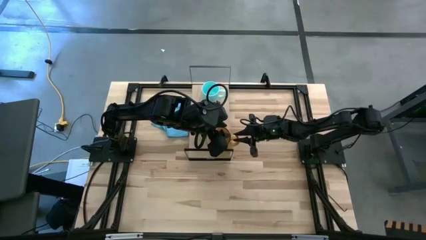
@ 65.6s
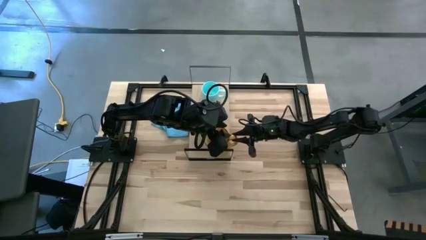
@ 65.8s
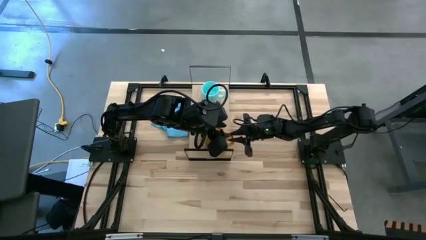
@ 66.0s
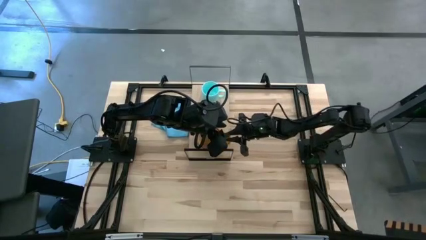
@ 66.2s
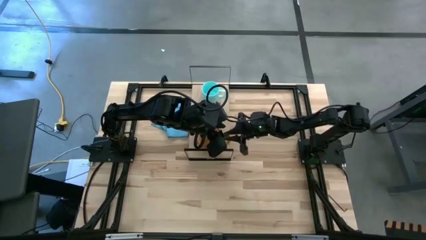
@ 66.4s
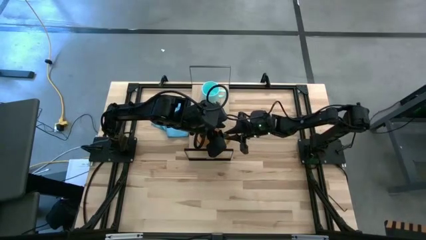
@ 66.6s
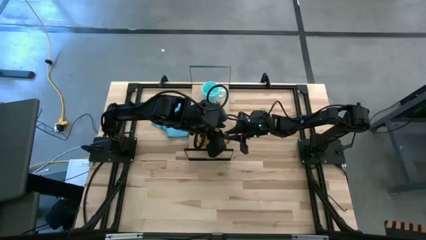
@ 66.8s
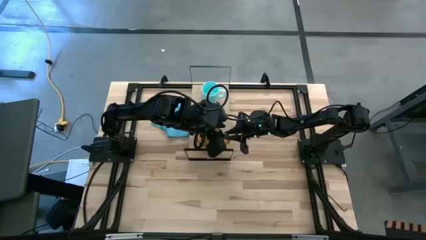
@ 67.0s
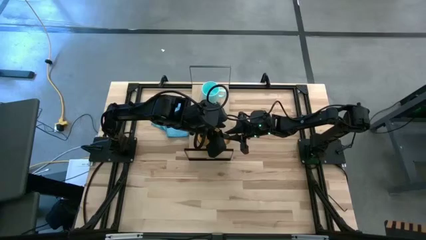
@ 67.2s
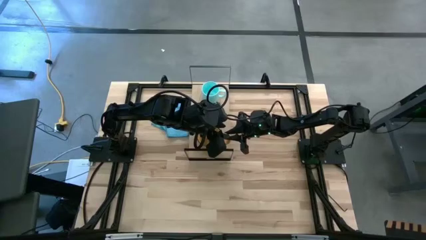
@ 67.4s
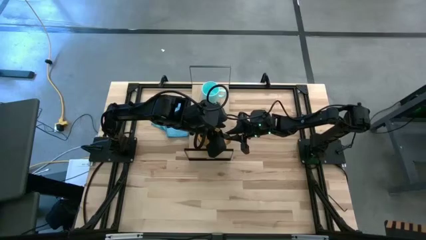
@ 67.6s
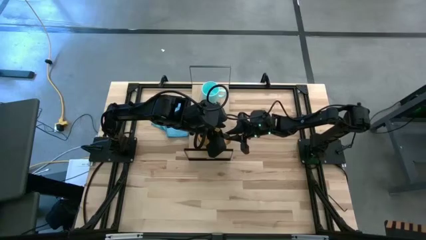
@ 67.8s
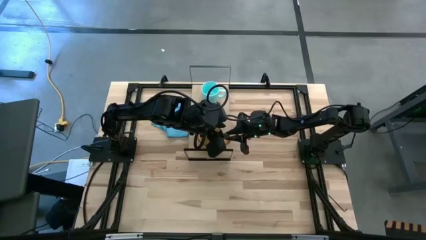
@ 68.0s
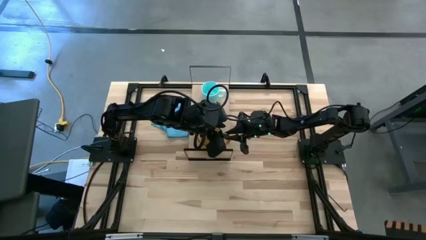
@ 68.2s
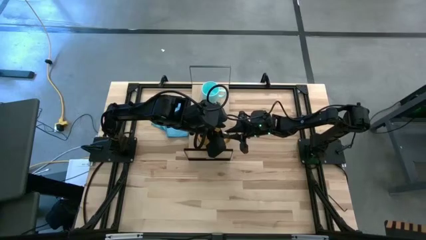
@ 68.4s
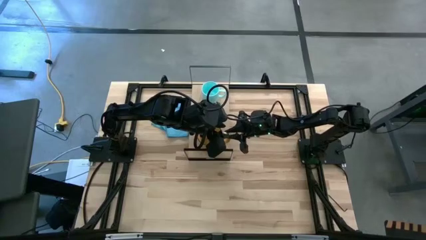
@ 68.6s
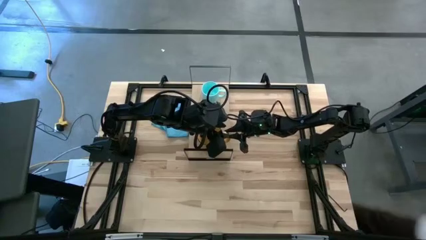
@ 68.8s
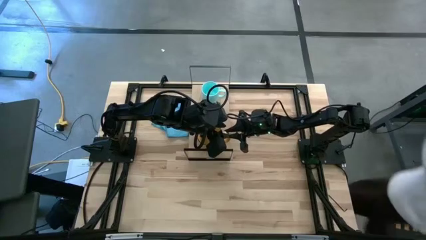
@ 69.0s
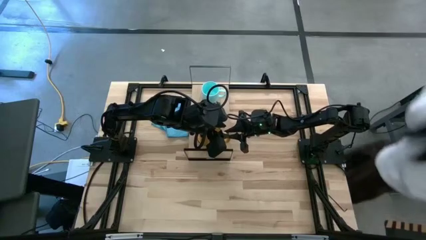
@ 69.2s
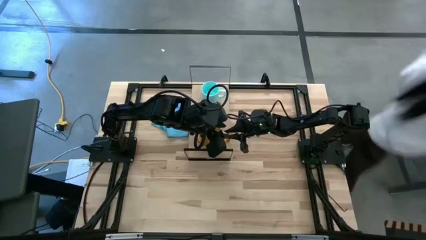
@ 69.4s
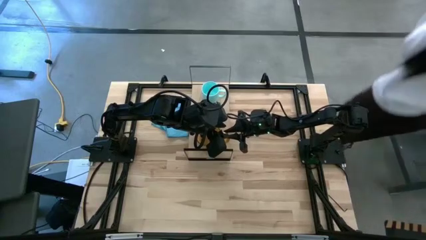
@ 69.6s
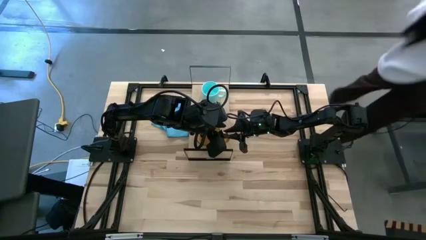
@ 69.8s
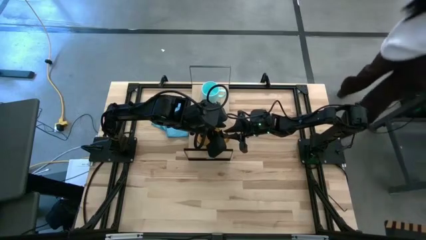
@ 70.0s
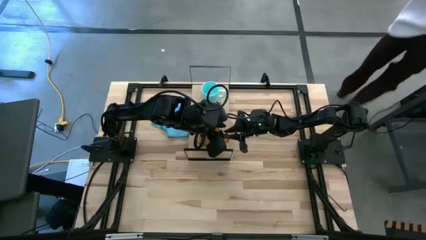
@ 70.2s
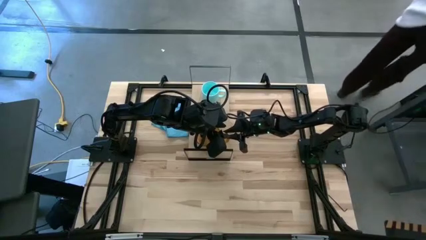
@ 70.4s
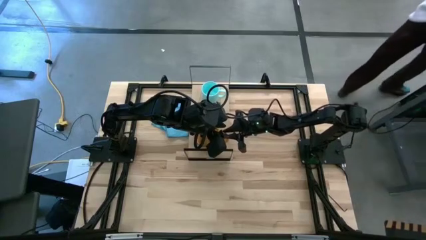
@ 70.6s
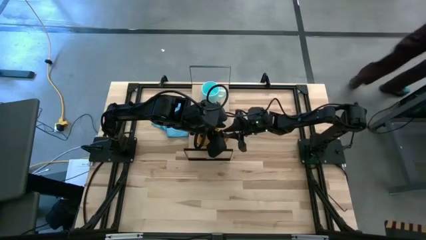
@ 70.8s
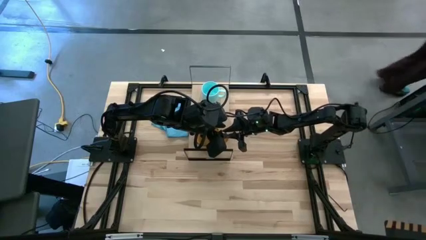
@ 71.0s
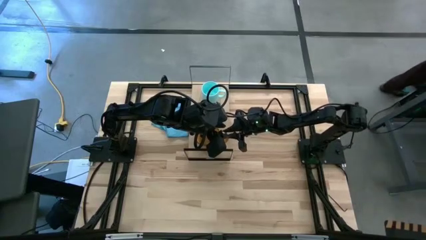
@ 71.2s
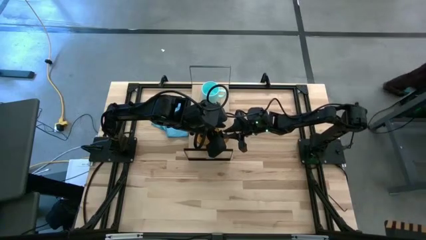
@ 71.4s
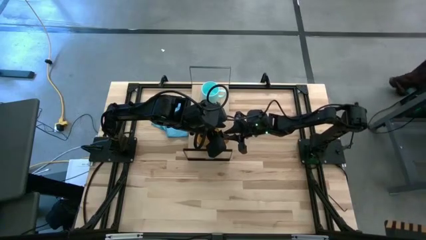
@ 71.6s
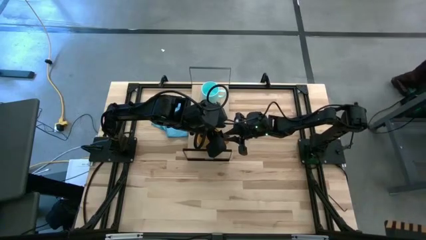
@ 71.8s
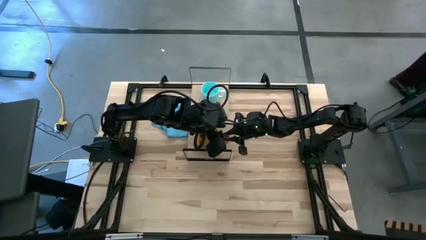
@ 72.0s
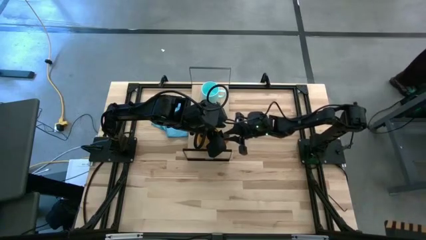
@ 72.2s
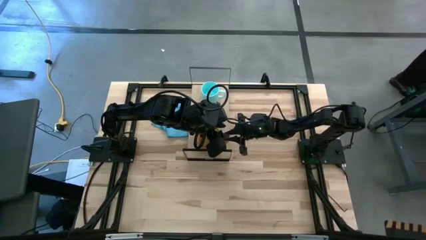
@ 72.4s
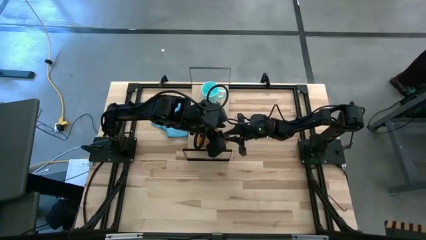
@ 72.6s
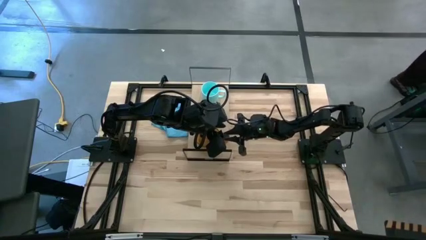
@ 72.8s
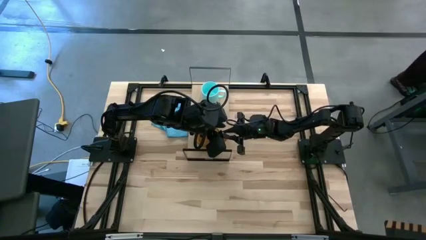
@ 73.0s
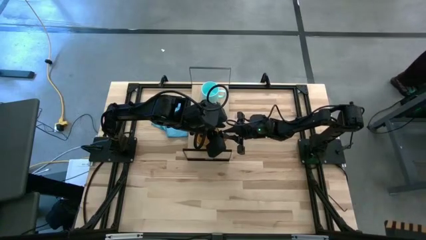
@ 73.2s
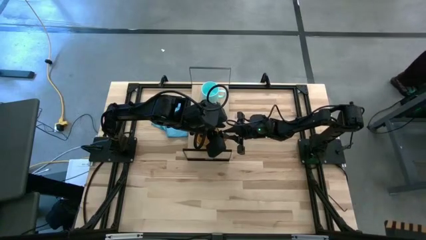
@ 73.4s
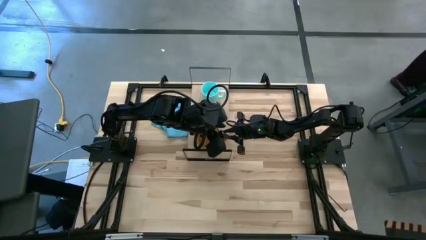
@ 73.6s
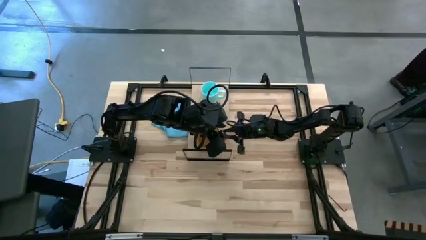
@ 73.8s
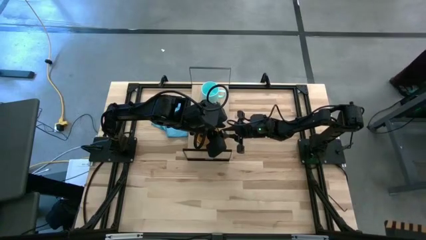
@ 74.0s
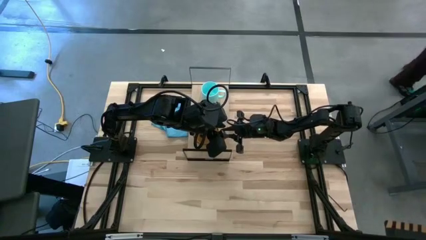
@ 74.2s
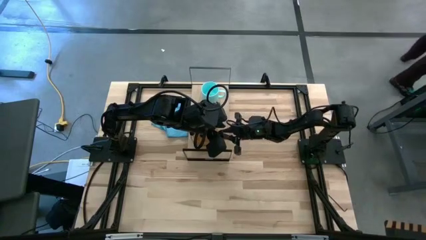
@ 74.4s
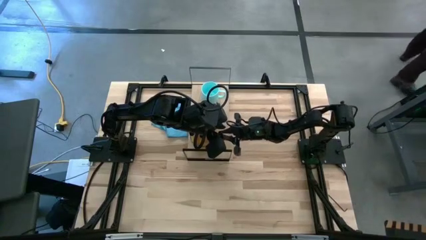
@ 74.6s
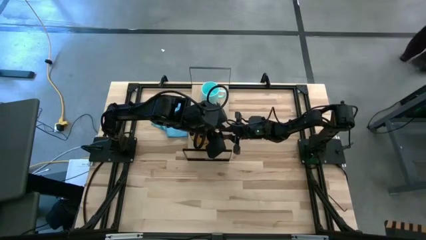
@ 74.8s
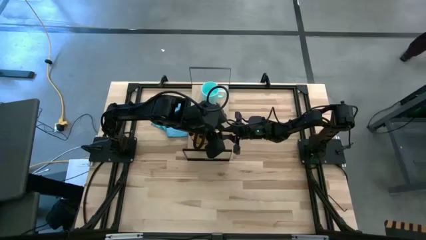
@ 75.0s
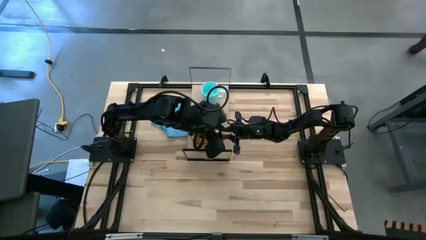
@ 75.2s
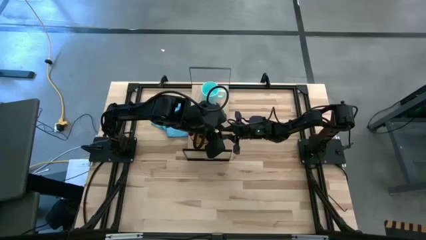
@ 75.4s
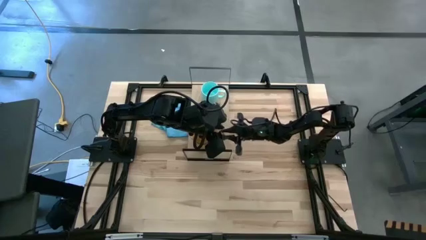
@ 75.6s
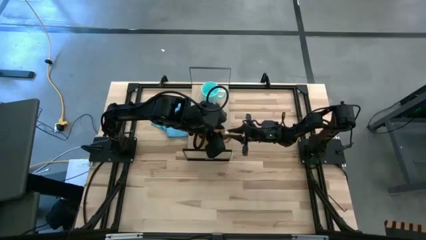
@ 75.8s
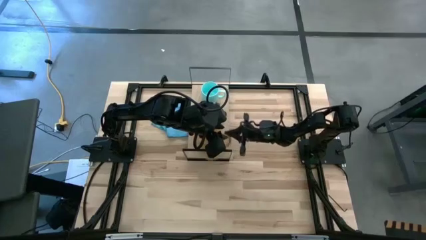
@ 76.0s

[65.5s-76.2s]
Task: Stack small to large cups/mugs on shelf
Put the yellow mug on the shelf

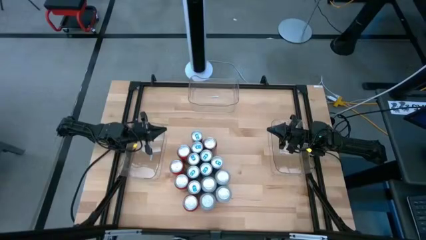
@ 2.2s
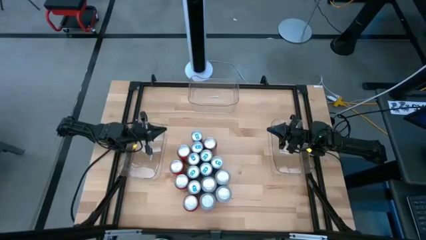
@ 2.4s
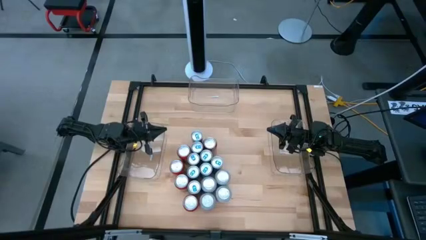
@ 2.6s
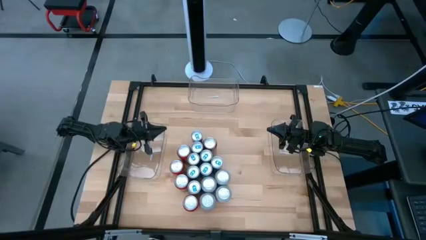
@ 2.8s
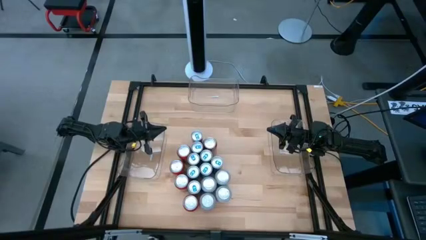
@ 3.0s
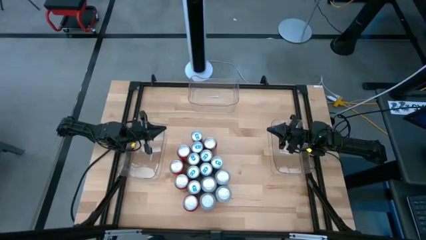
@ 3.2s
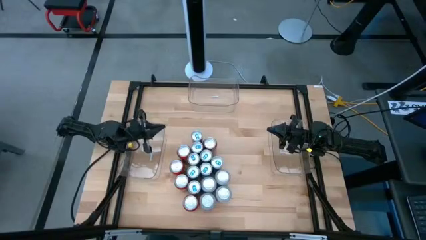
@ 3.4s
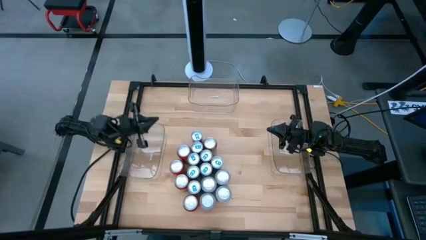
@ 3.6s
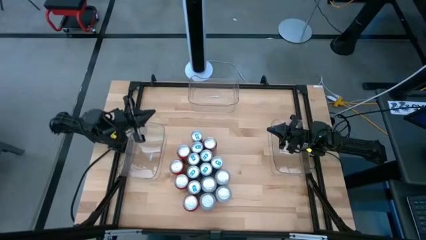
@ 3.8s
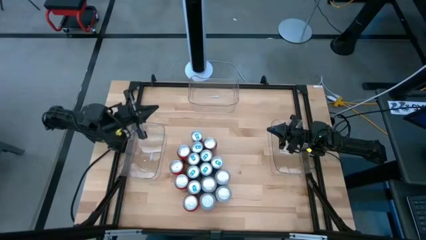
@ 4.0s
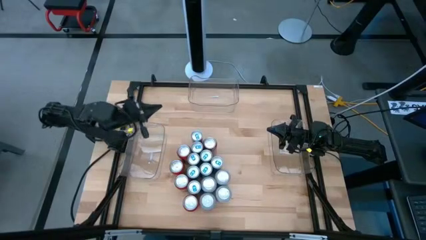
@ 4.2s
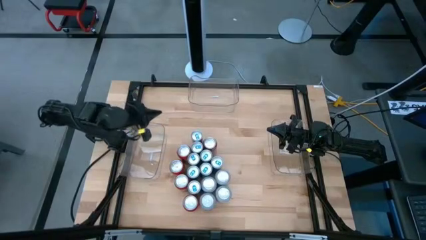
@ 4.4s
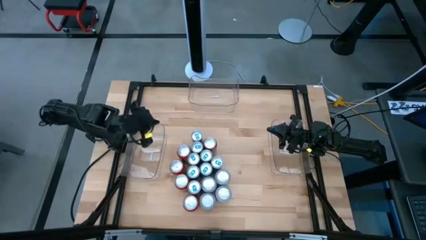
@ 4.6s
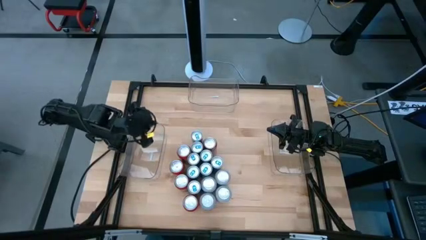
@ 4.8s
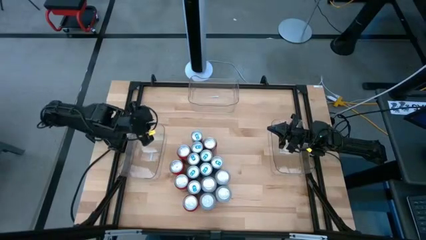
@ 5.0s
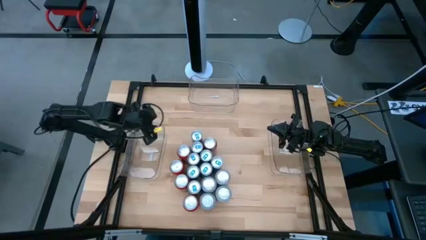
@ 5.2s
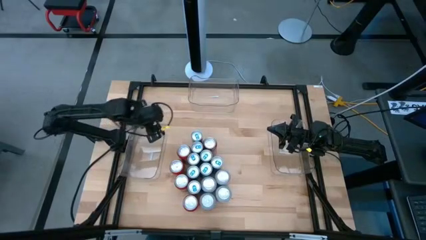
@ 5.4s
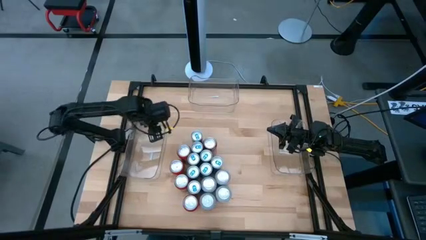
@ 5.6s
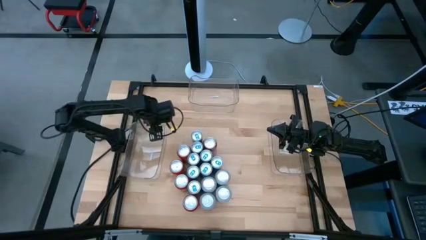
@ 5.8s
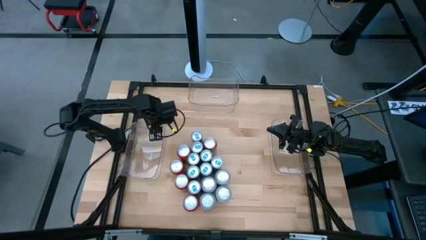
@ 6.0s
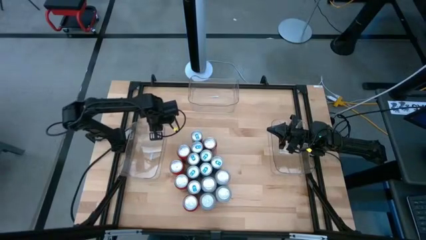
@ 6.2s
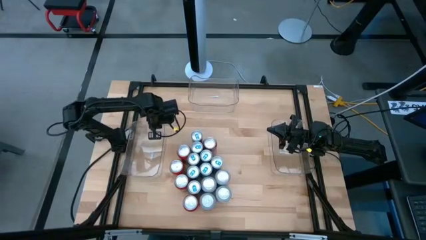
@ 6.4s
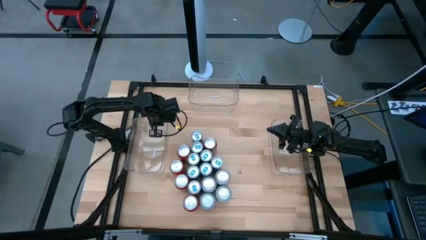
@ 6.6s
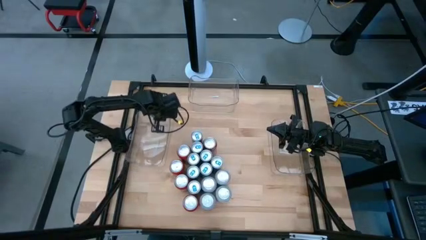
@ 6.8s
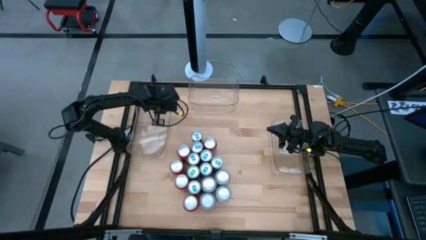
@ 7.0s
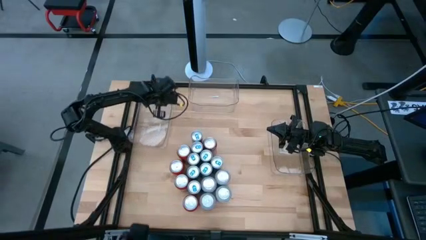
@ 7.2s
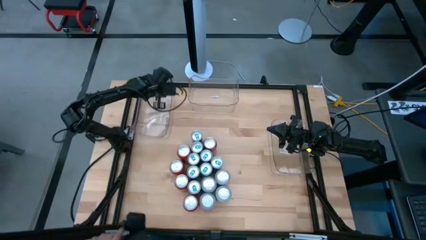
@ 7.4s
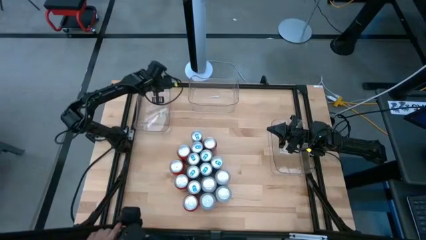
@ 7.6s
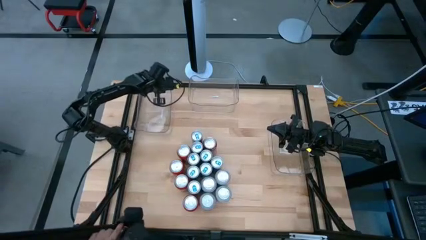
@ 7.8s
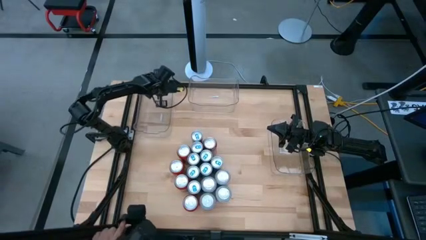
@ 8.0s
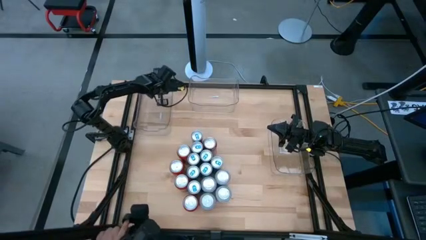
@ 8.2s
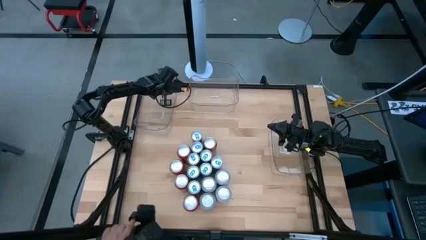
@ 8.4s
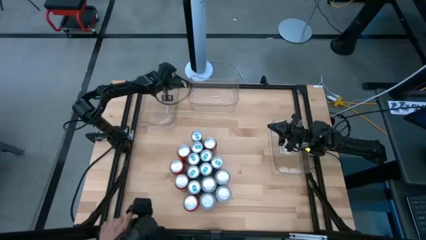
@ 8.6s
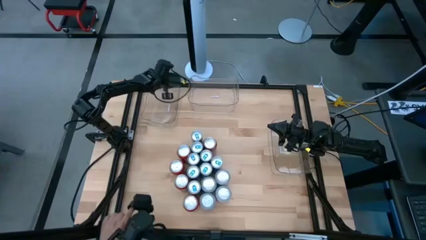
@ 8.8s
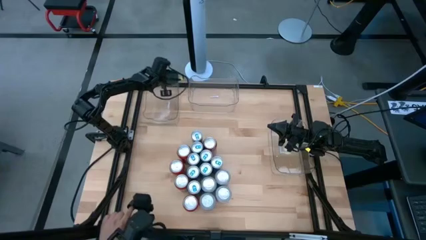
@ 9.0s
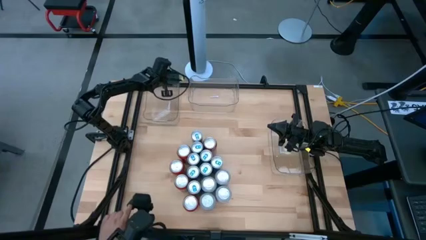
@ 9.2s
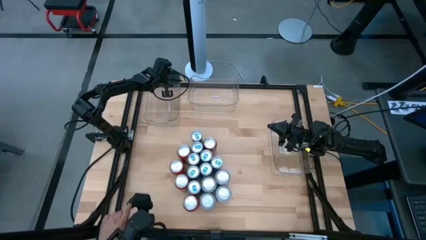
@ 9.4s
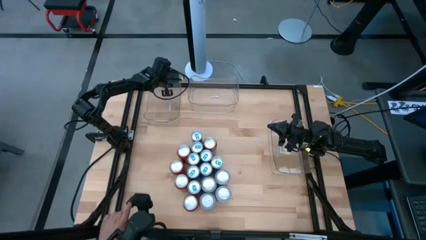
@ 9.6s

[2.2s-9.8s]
Task: Sort soda cans
Move the bottom left transparent bin to the top left area of the table
